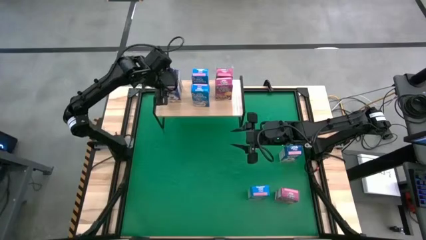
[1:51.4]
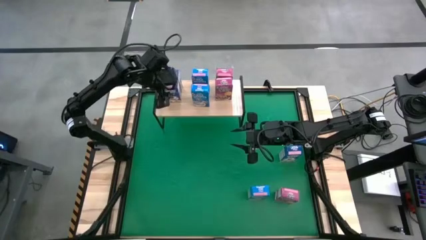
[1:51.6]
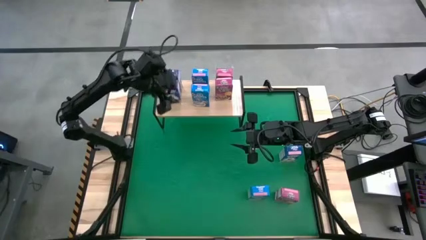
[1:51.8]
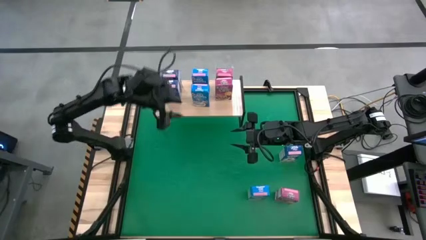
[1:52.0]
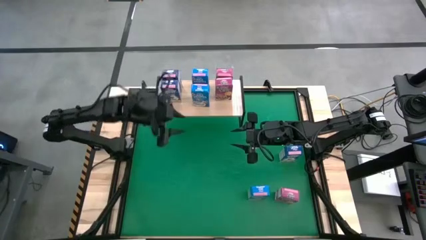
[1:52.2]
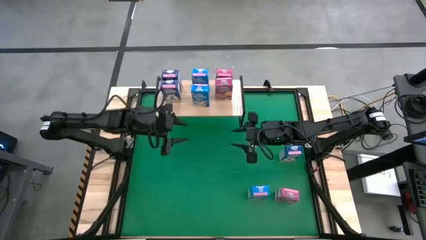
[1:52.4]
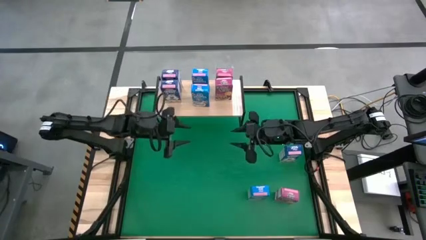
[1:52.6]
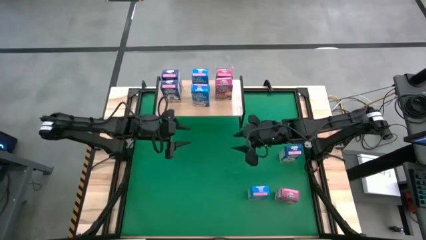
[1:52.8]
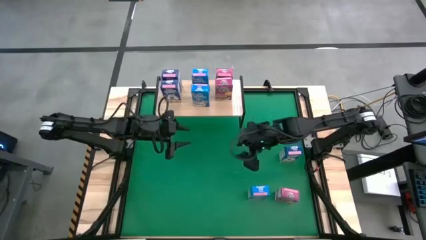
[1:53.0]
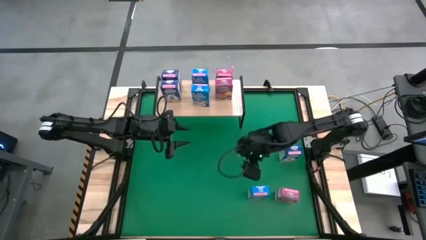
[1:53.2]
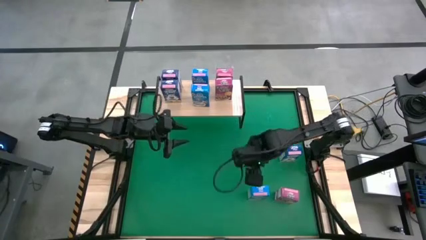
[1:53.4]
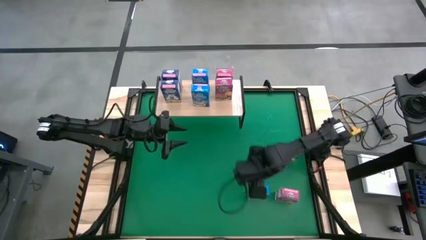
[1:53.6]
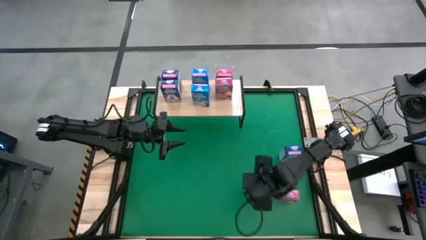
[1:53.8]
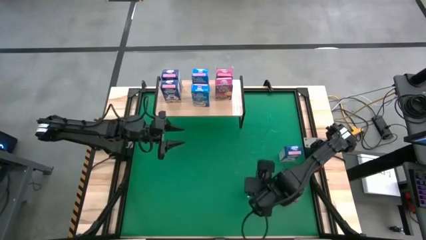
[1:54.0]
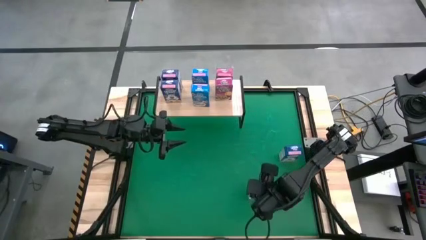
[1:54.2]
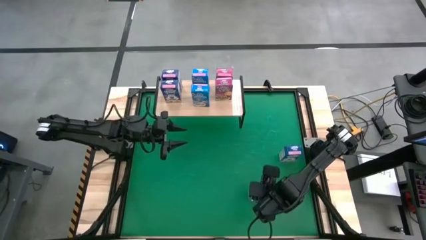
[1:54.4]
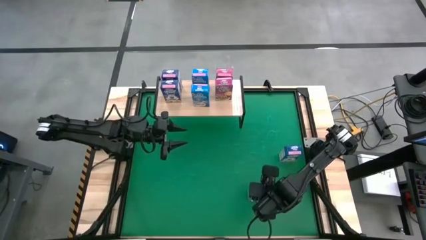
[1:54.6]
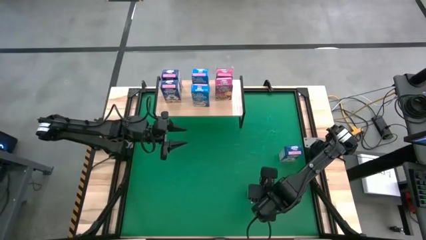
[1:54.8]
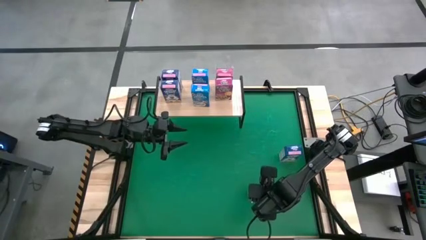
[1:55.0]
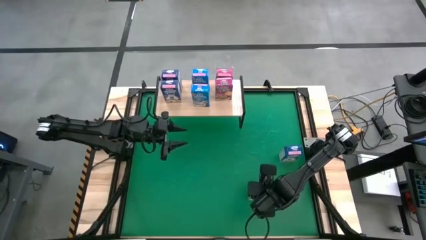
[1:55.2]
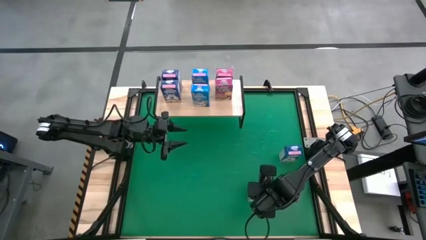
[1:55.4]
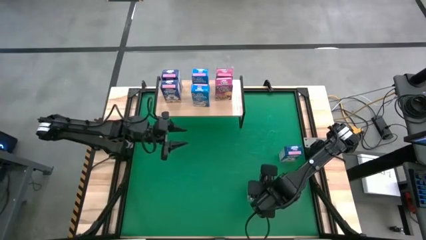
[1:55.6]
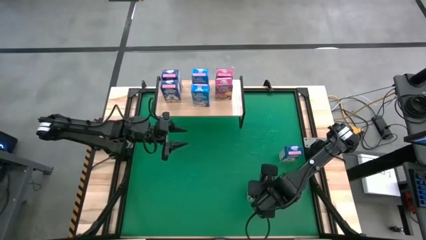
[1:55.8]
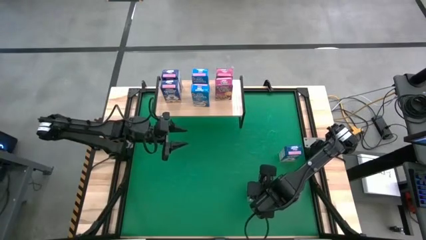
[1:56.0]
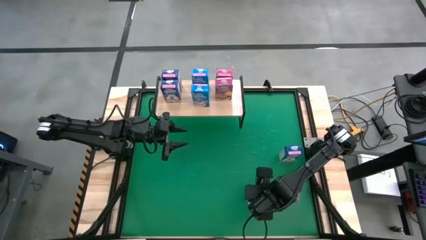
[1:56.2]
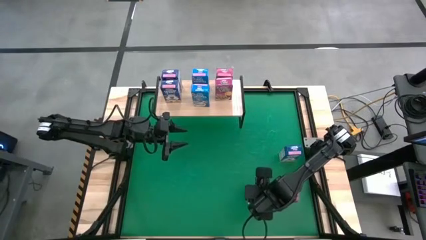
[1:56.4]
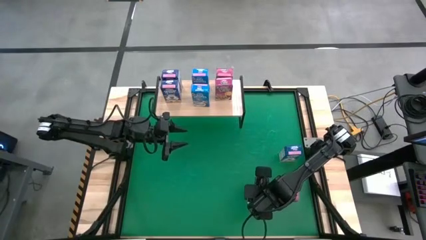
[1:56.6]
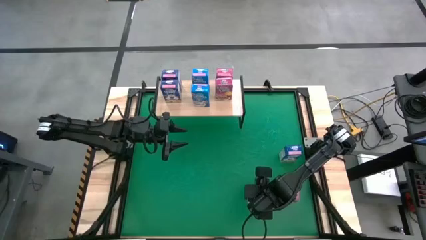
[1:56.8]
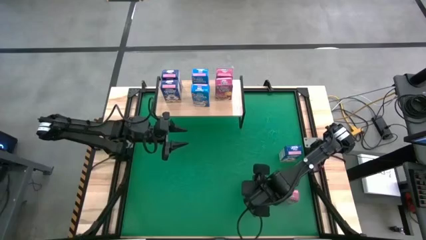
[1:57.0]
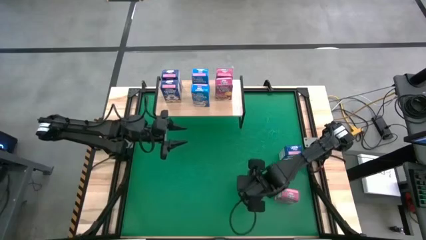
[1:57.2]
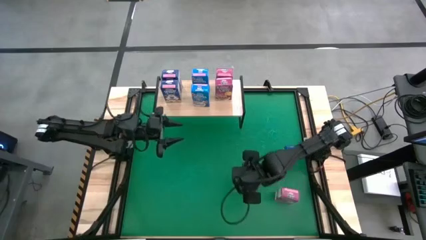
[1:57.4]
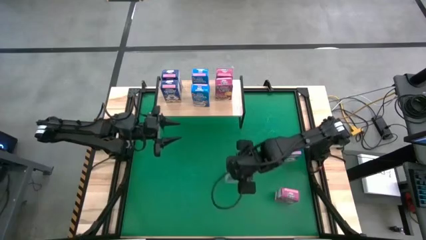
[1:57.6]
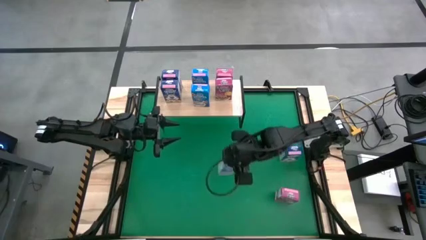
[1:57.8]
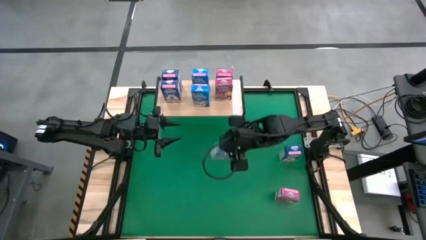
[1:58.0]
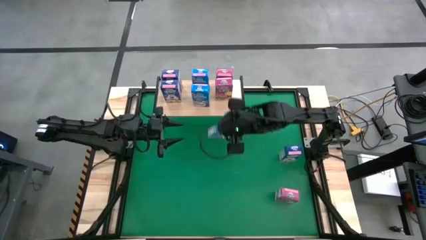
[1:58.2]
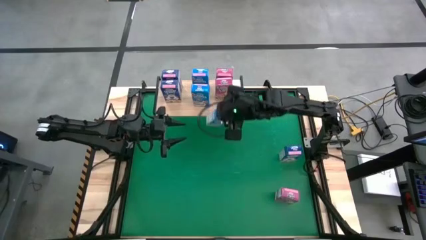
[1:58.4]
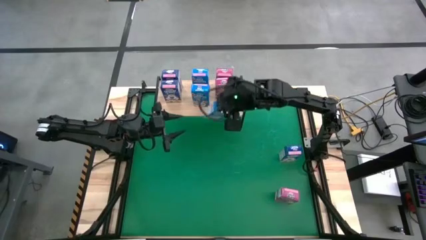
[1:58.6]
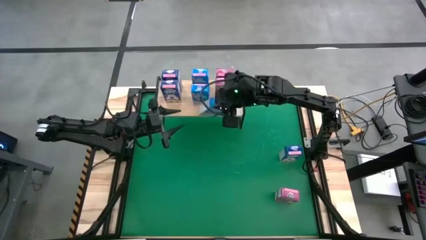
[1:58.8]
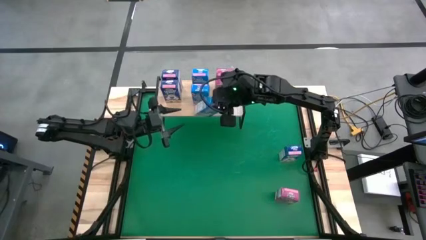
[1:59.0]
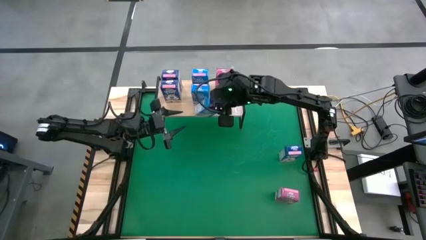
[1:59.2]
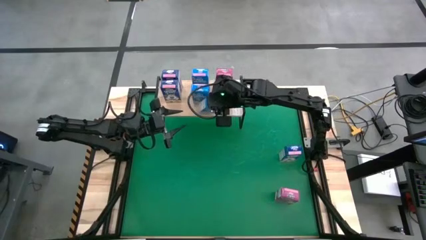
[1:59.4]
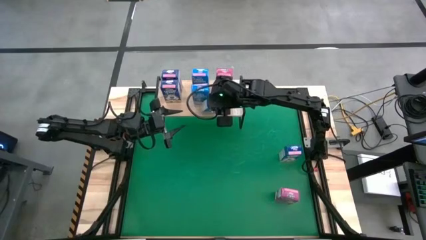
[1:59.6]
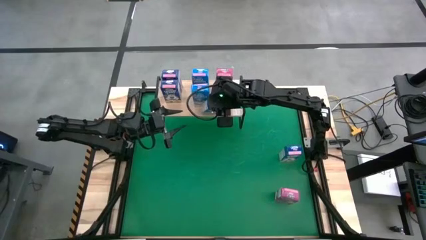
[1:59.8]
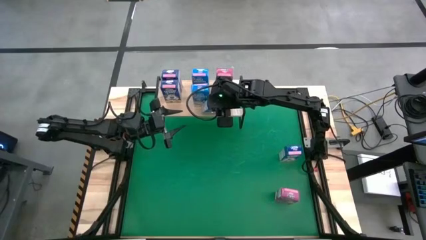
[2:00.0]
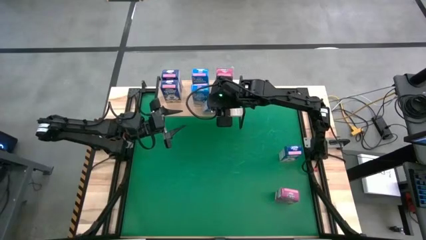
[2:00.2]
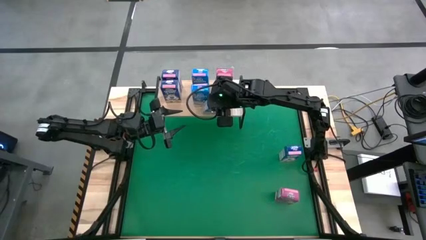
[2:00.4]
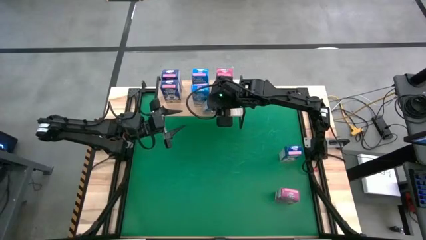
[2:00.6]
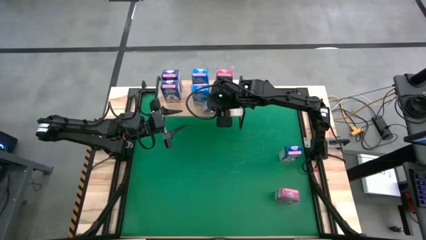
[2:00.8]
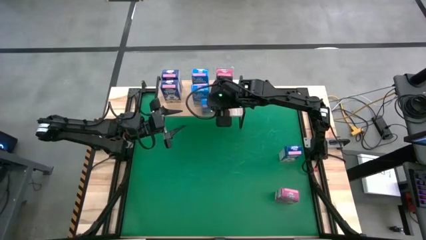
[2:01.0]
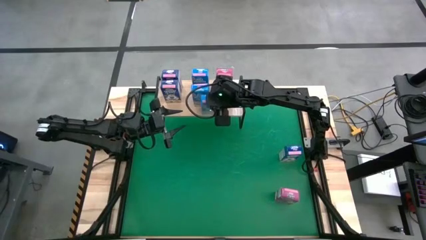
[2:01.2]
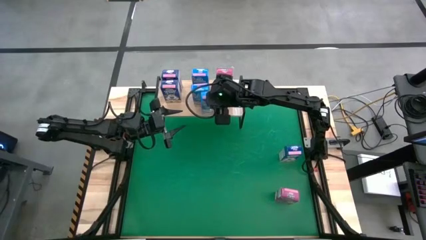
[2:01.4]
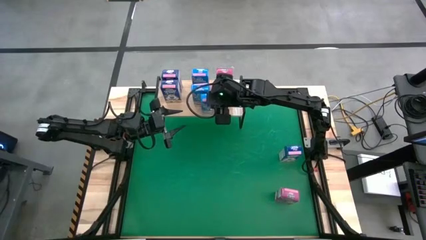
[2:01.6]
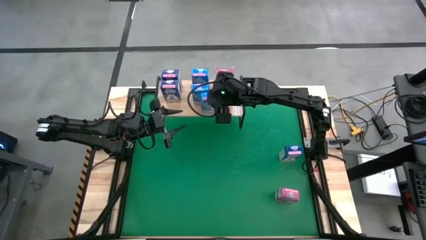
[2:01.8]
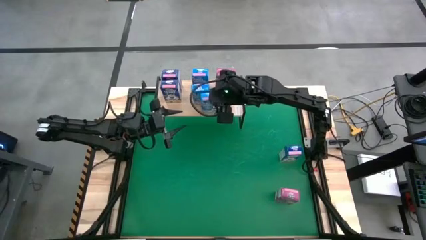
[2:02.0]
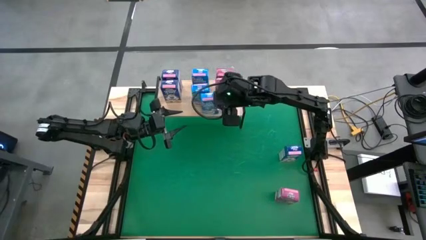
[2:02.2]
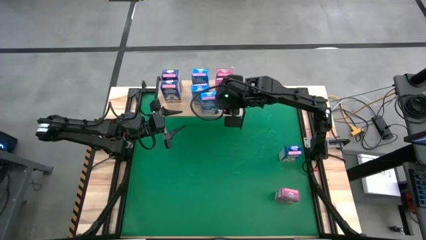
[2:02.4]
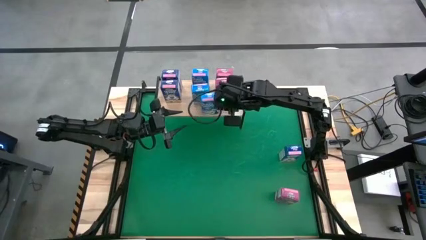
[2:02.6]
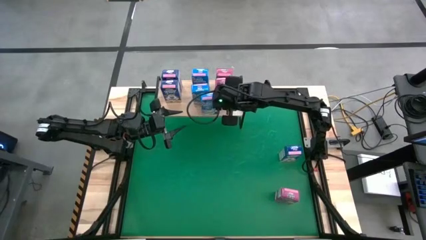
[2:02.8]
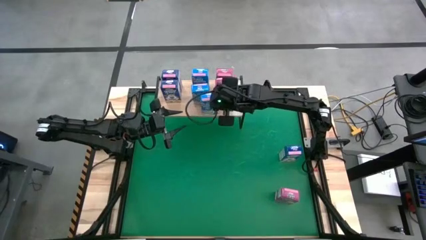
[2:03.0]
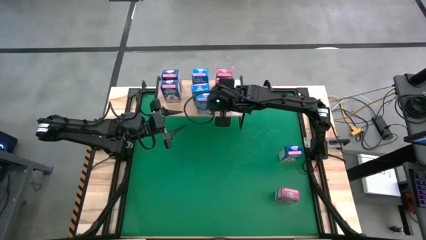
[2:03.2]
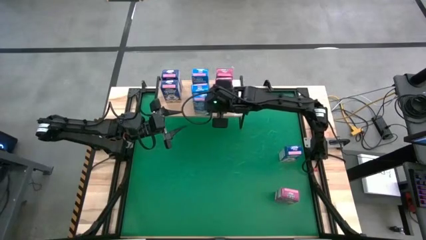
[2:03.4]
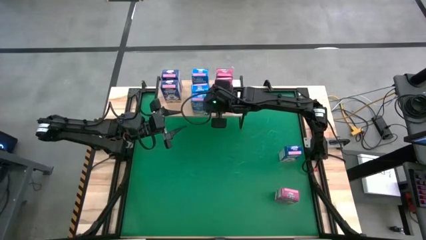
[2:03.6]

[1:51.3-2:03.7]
Task: Stack cereal on shelf
Put the light blue cereal box on the shelf aligned with the other light blue boxes

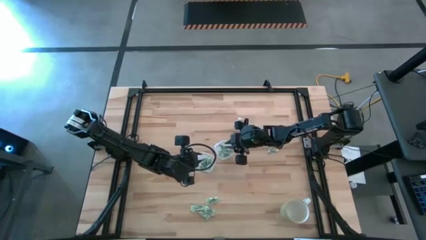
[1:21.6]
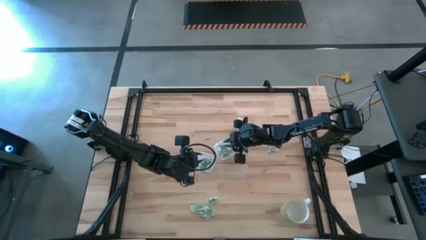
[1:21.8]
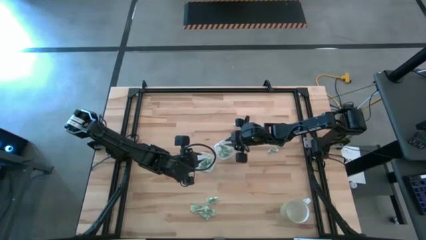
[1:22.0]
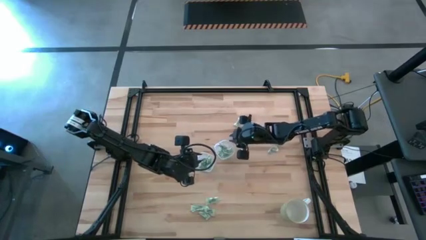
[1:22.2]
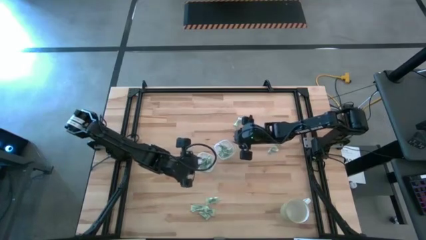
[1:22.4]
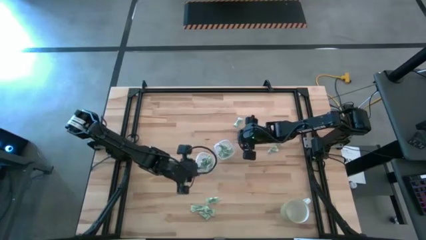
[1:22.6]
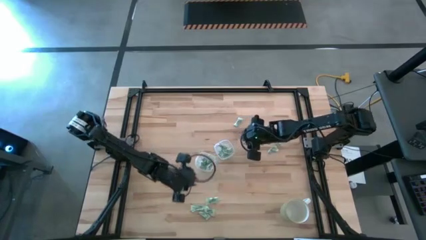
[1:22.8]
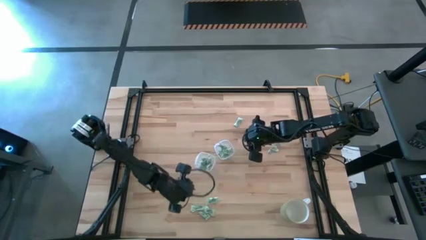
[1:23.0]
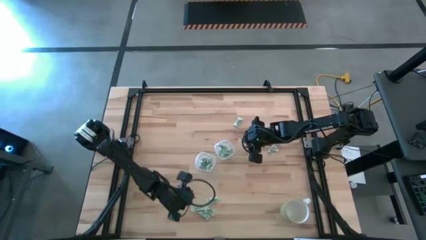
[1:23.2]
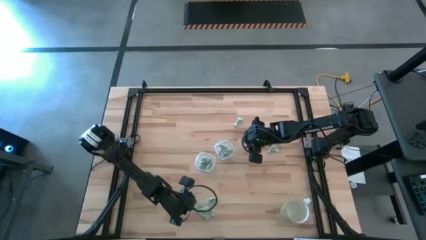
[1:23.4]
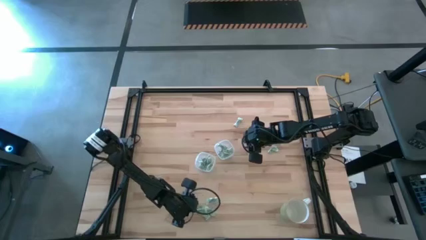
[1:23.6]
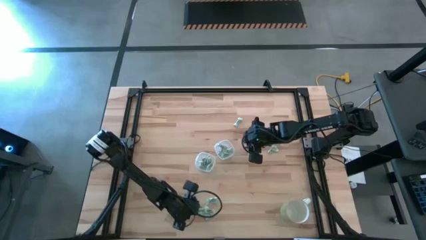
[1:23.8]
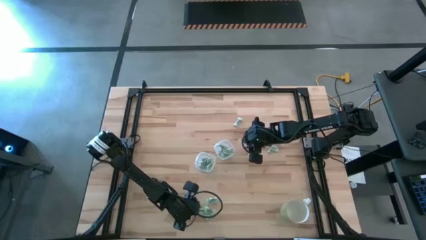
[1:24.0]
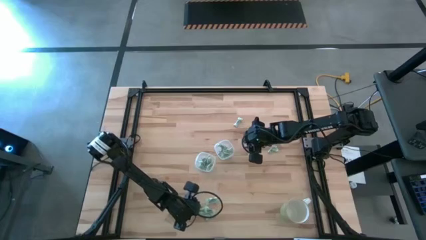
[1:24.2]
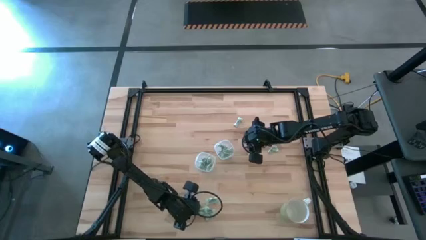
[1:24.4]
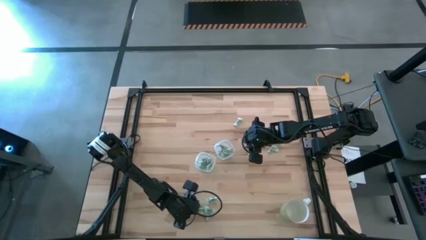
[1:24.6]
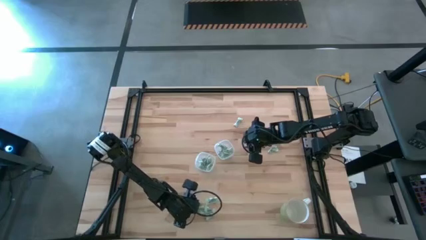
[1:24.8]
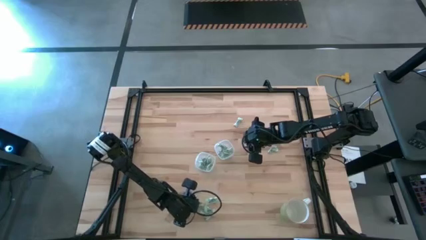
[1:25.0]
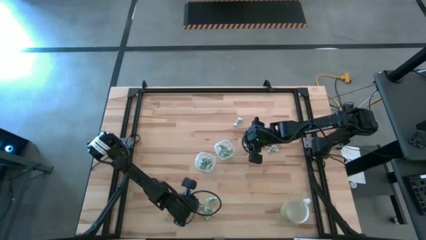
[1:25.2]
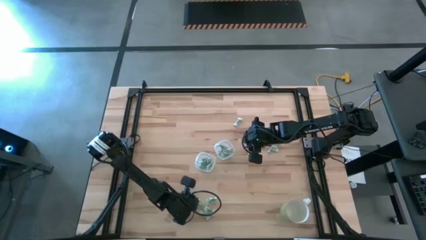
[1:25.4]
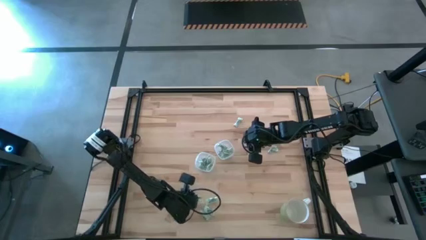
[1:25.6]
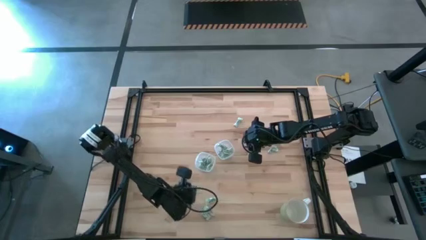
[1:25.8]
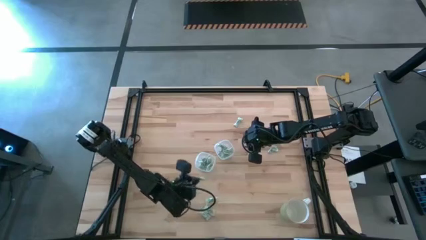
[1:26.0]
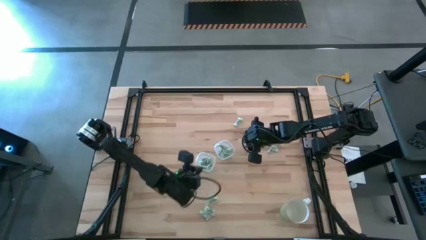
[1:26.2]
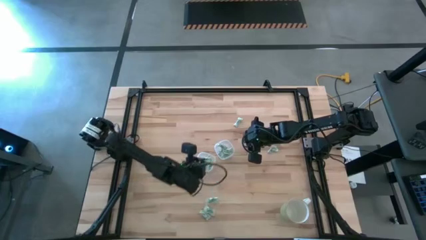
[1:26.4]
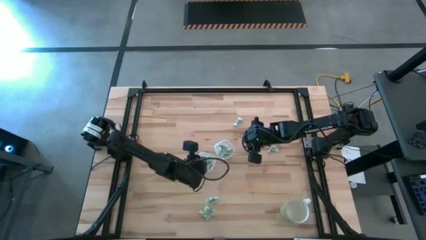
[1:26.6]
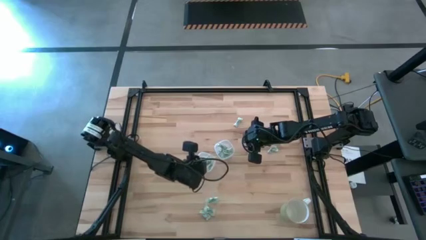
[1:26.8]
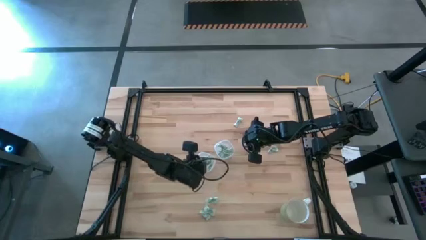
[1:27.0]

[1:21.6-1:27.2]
Task: Pick and place items into bin
Put the stevia packet into the left bin
